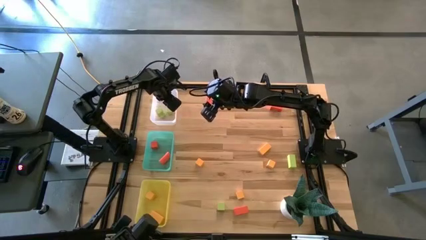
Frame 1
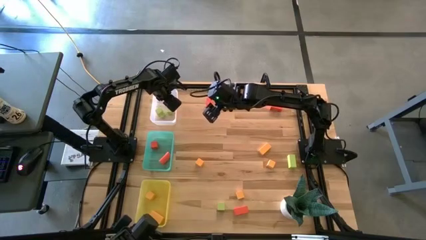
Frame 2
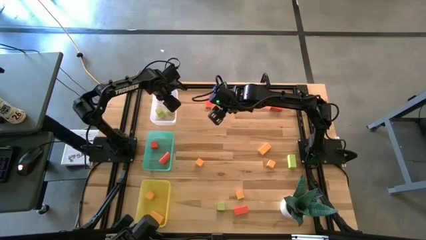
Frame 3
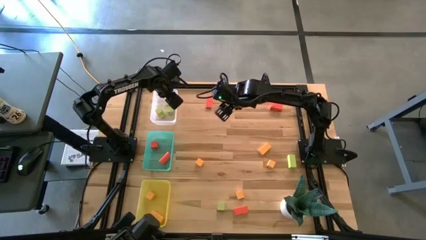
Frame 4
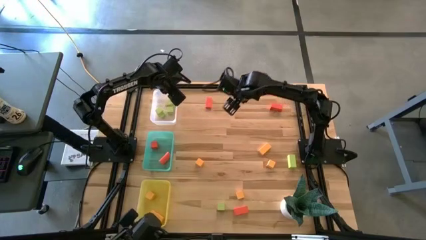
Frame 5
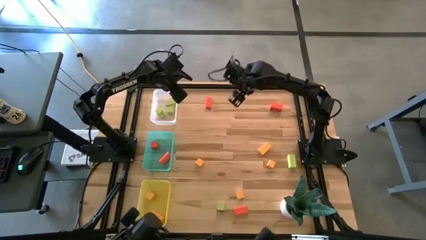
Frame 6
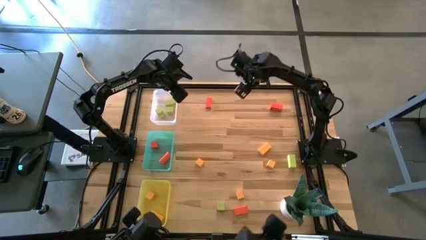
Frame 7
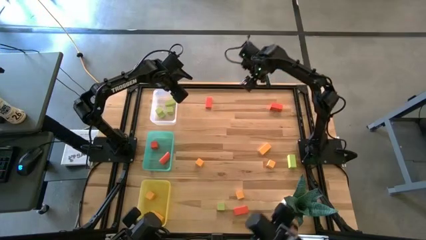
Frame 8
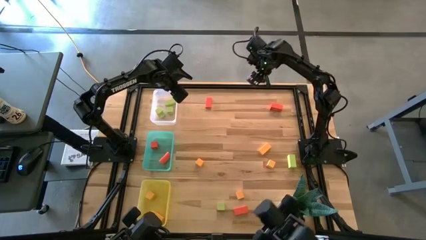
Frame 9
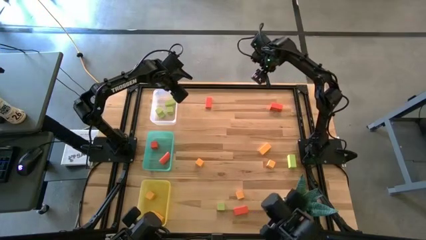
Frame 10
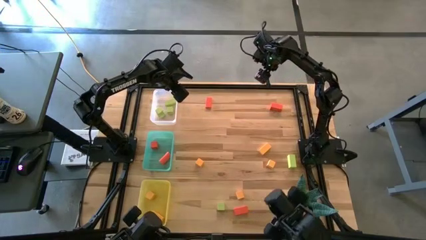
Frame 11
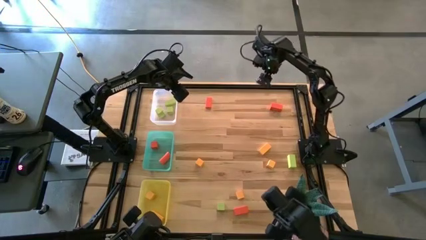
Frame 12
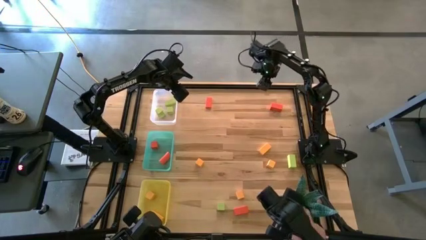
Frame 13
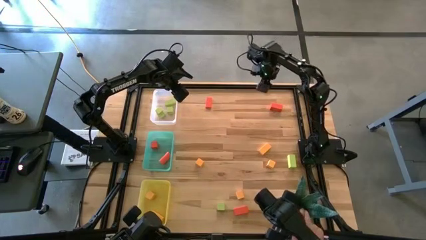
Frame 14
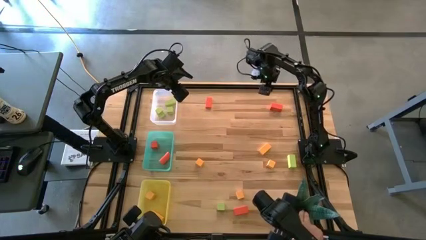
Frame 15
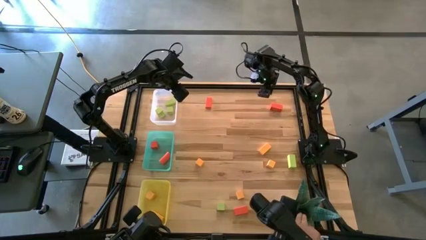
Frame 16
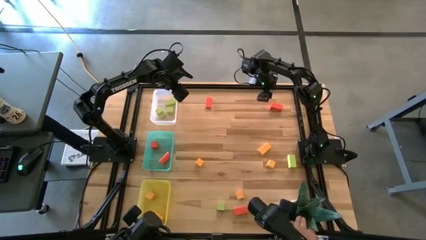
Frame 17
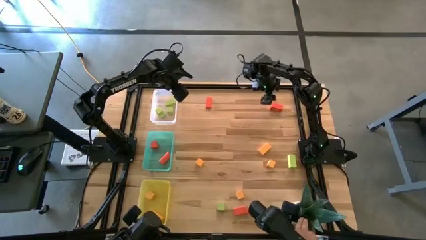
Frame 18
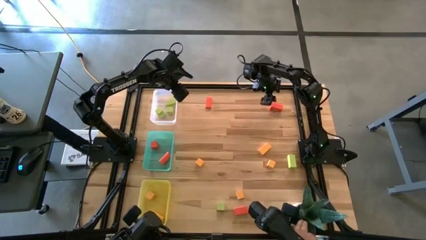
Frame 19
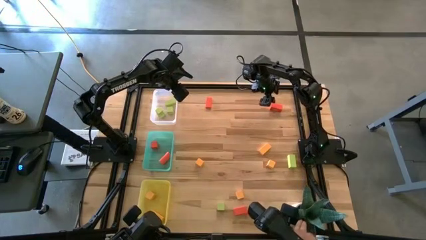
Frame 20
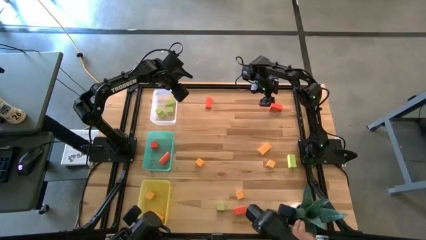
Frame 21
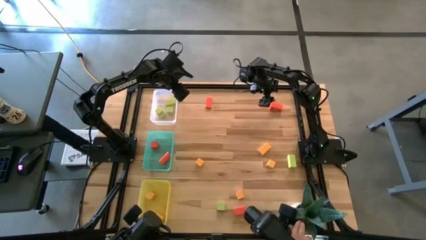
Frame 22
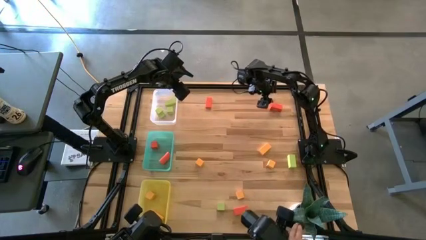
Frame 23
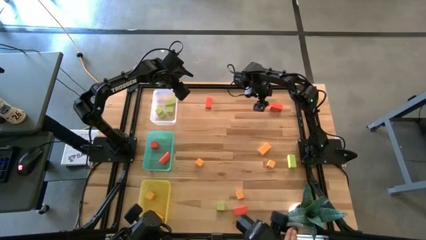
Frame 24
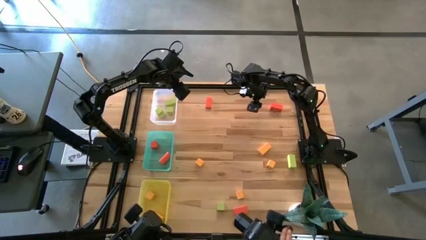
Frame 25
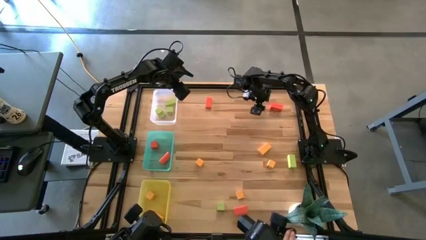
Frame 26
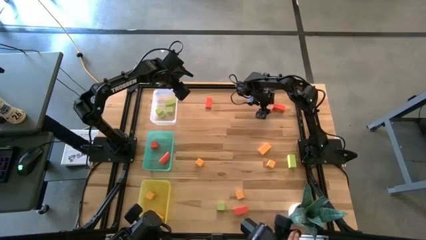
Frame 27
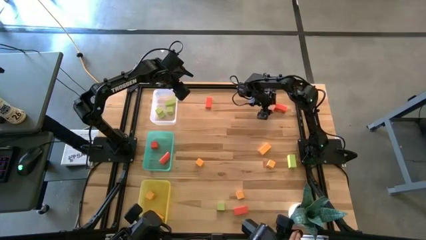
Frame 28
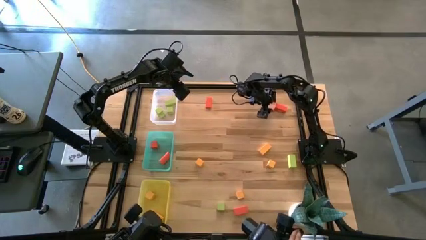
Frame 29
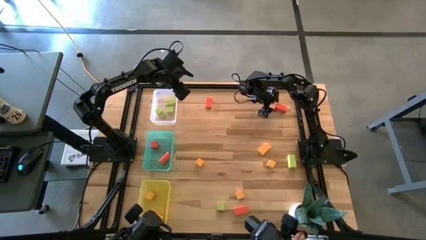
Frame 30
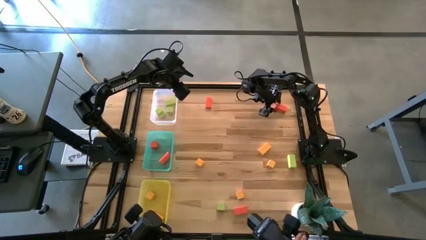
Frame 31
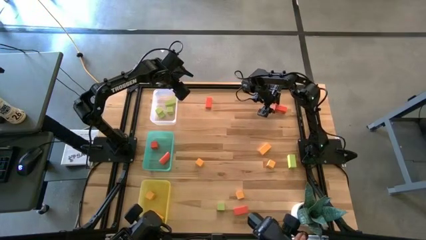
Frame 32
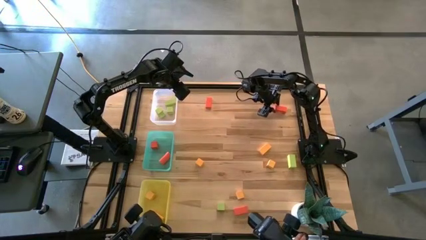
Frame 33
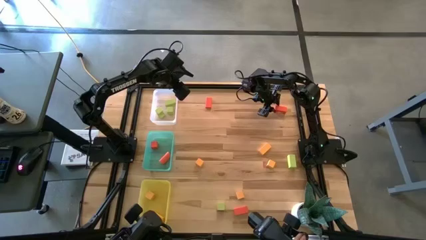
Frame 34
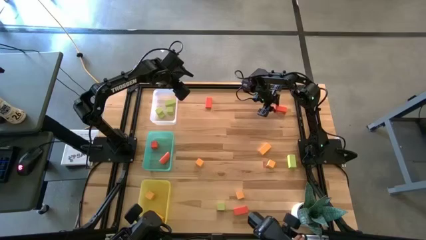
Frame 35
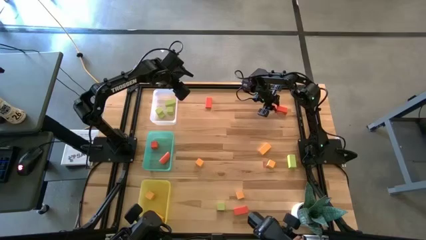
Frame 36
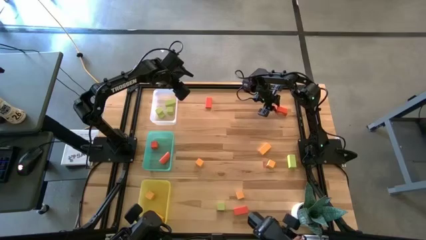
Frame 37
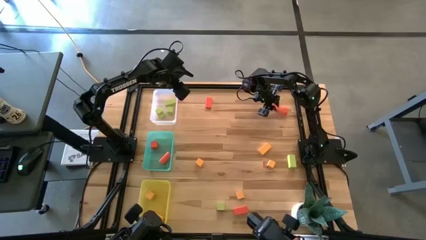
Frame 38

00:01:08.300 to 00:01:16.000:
Task: Sort & place blocks by color
Put the orange rectangular block into the blue bin

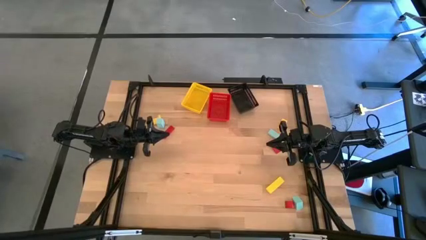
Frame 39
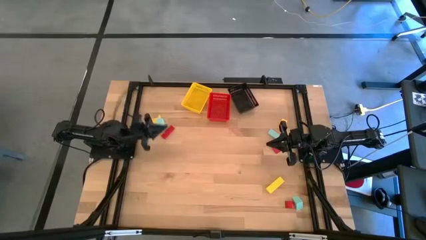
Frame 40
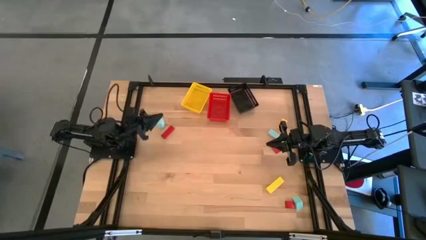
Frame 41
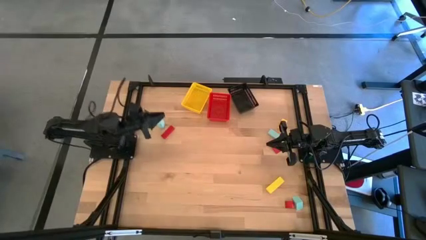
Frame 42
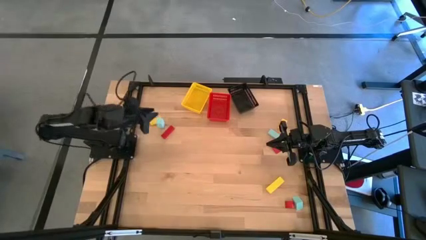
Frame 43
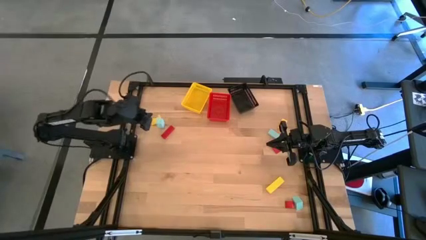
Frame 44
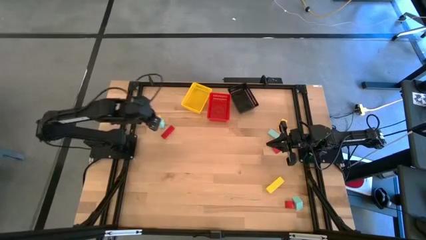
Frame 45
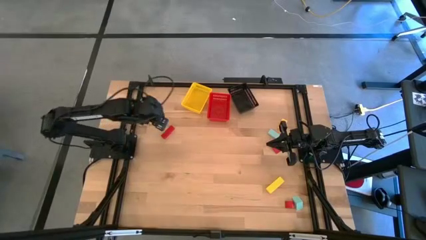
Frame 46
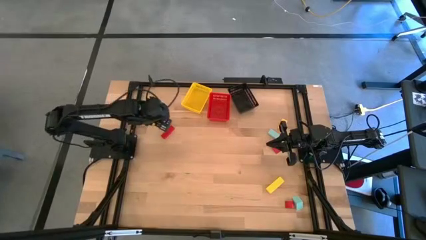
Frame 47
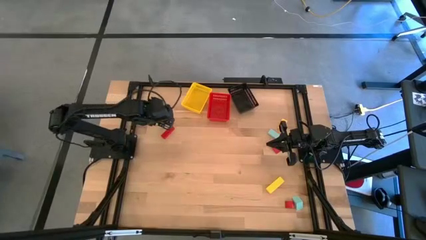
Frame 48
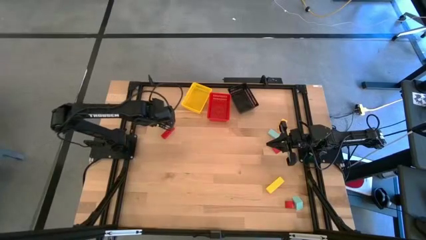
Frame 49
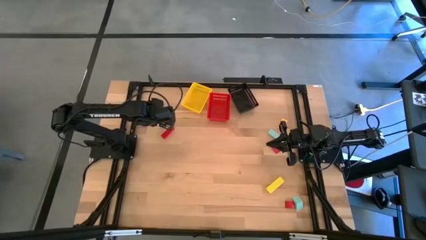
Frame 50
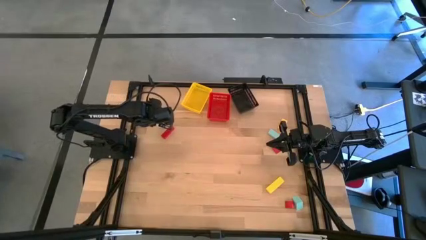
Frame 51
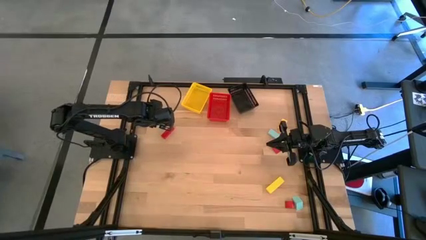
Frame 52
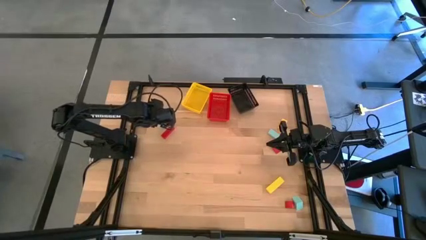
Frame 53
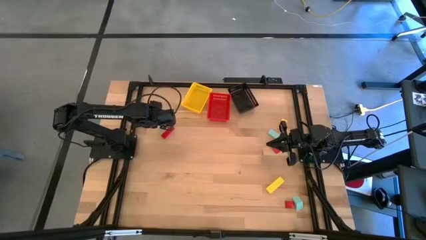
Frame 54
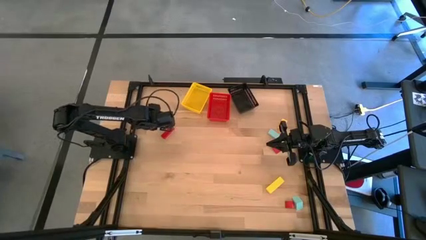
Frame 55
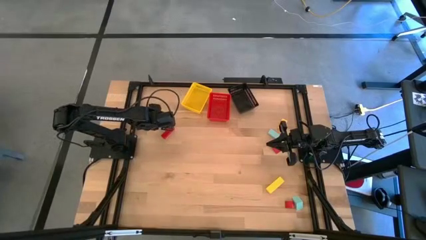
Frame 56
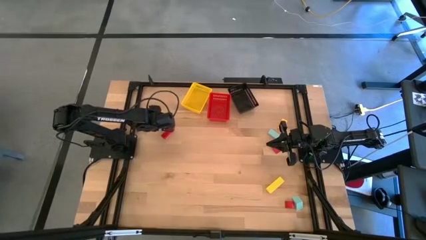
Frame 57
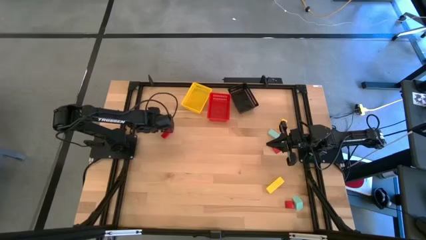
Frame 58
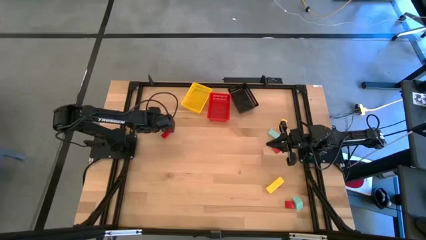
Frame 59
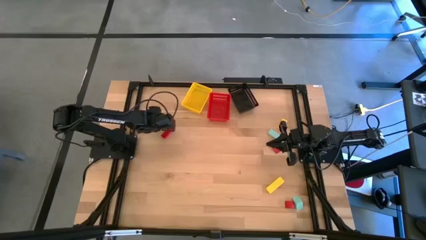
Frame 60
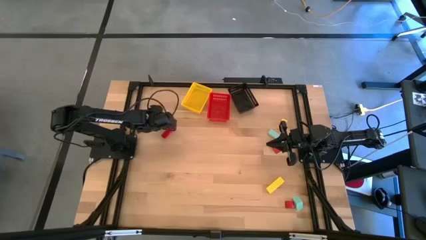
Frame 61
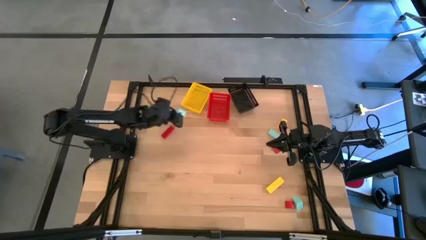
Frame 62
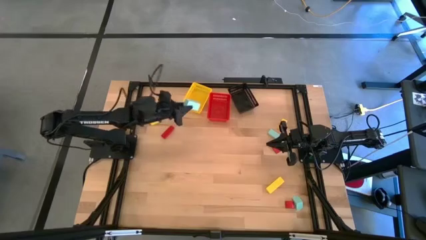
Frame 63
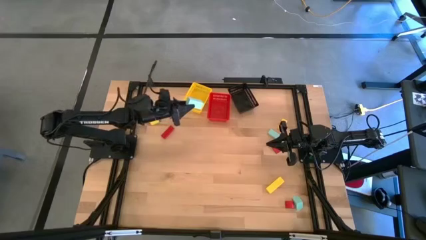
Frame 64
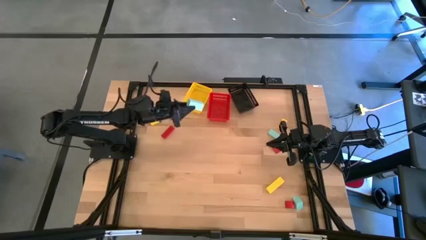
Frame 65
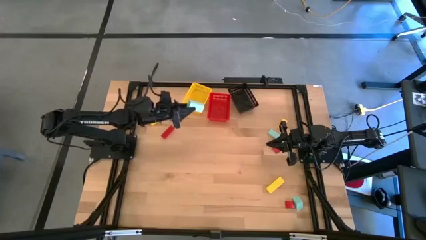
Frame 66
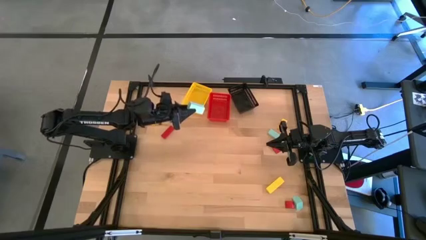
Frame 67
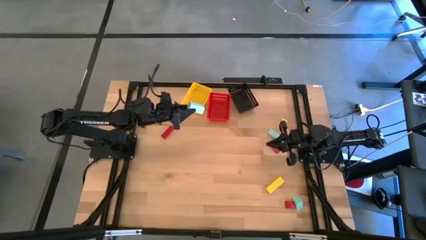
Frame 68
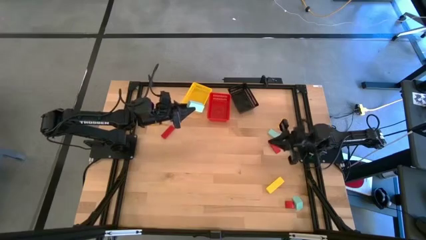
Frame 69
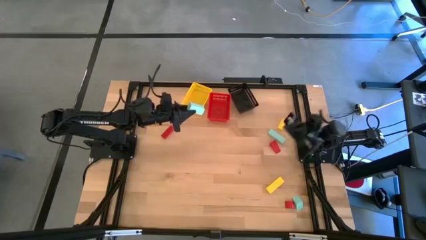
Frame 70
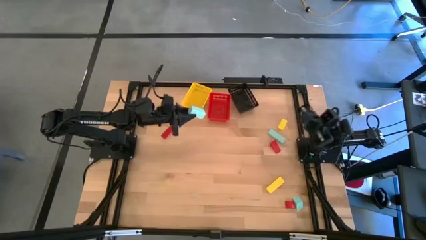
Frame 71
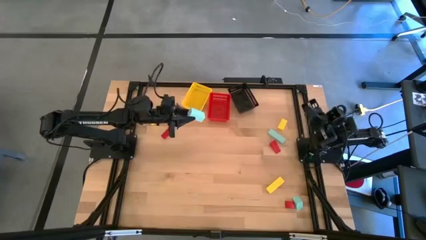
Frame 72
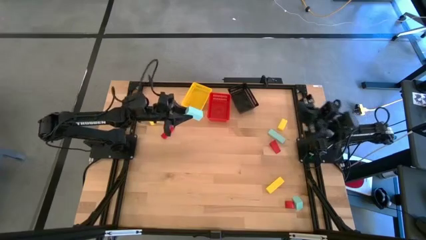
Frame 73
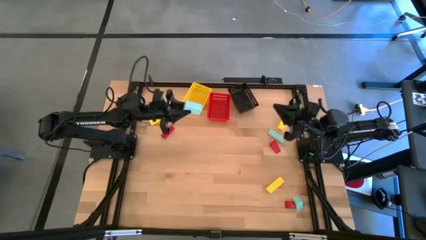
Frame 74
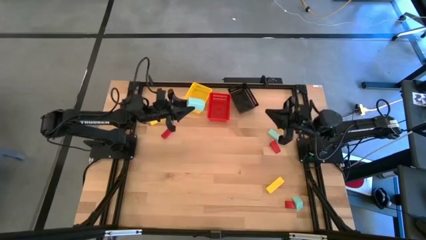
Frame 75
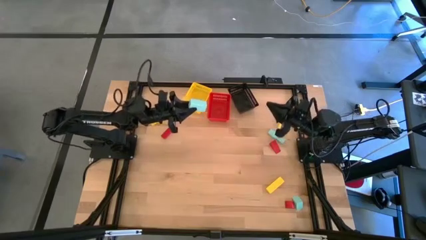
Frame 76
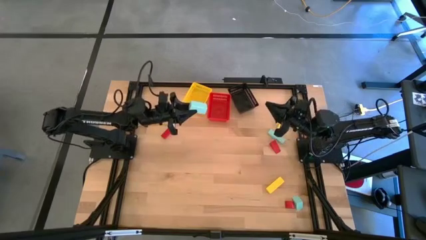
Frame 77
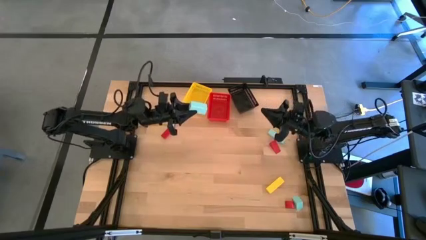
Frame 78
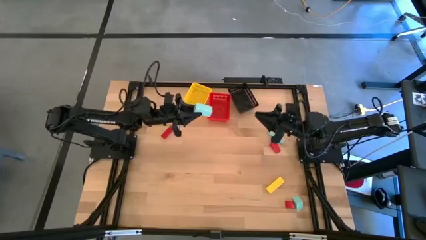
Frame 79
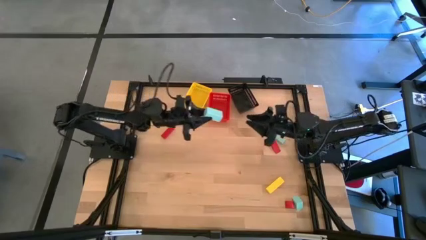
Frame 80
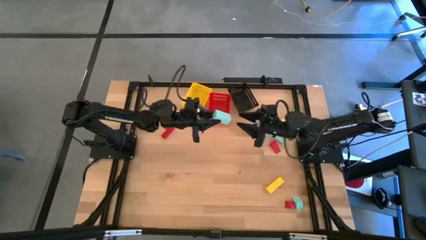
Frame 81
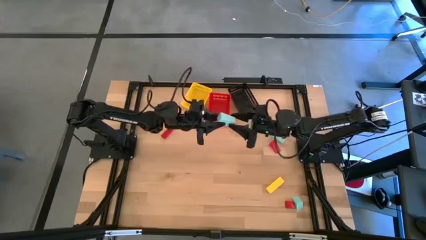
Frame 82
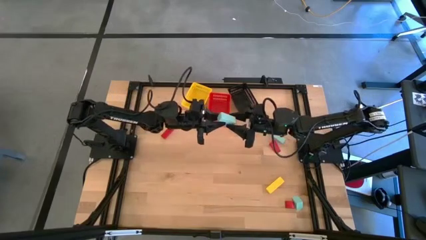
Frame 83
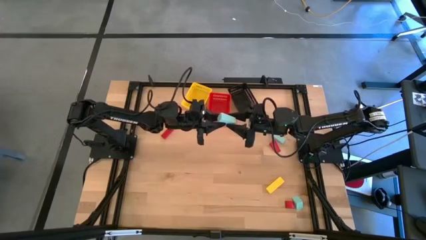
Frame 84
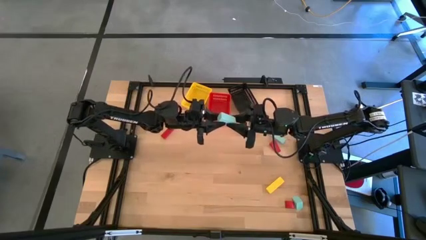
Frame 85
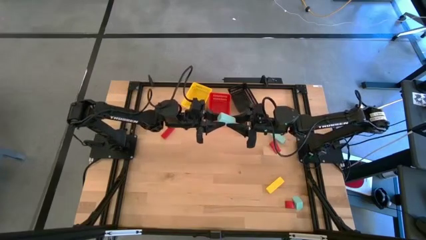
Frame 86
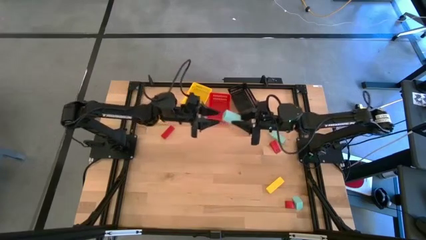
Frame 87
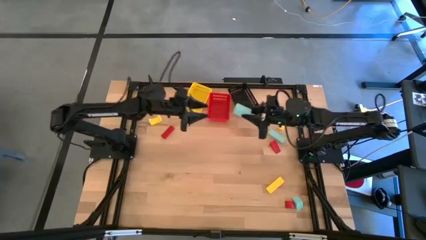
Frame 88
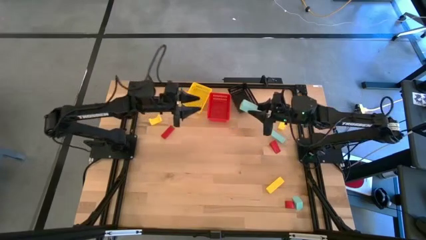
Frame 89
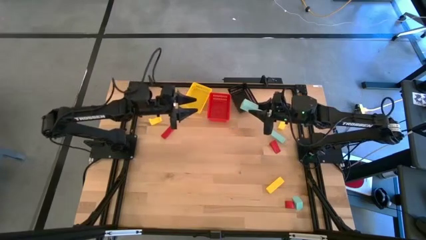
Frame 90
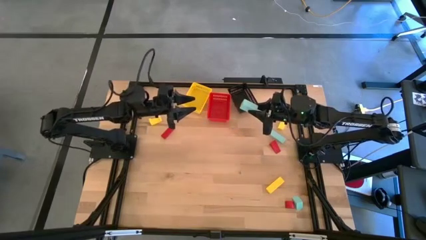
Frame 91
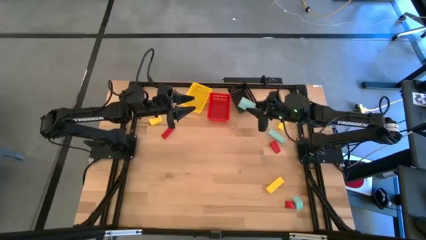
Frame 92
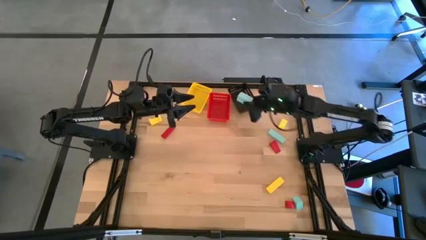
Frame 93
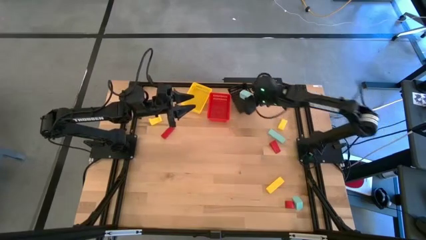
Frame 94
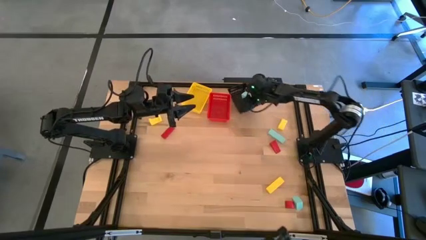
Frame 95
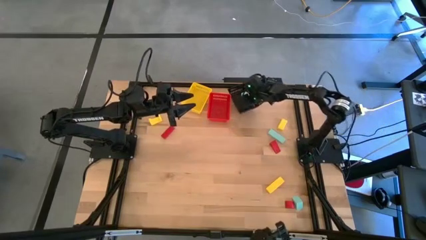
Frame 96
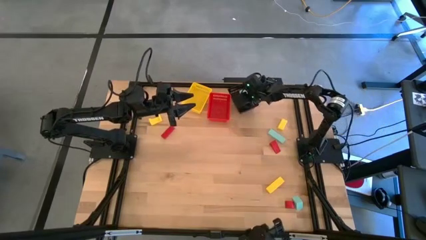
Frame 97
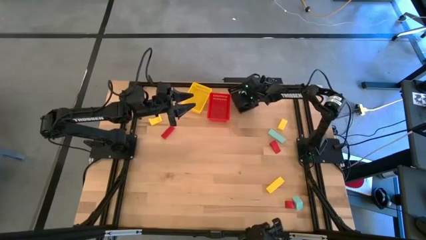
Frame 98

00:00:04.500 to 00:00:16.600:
Task: Sort & place blocks by color
Put the top left blue block into the black bin
